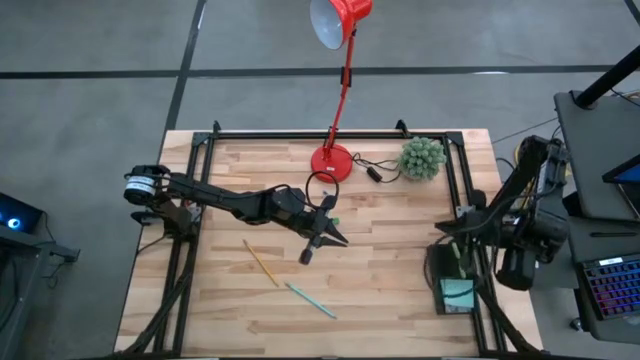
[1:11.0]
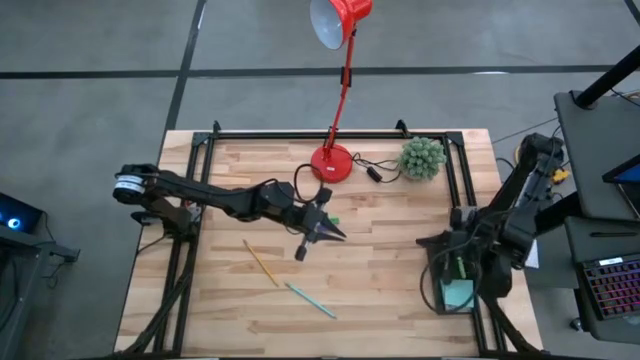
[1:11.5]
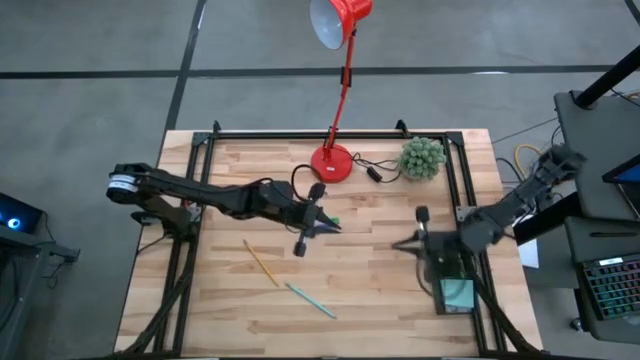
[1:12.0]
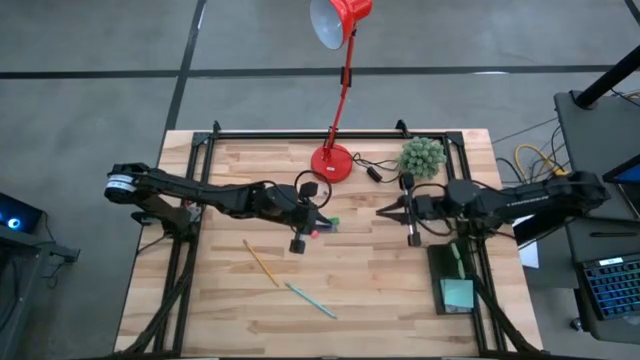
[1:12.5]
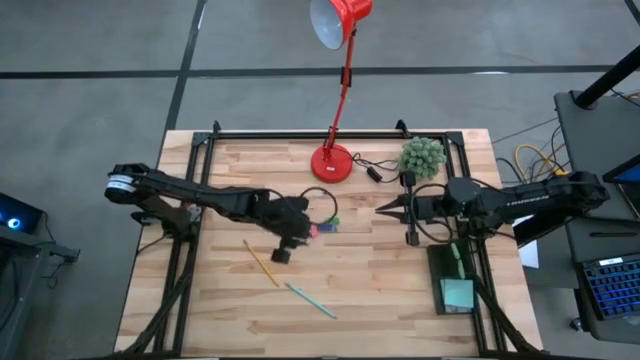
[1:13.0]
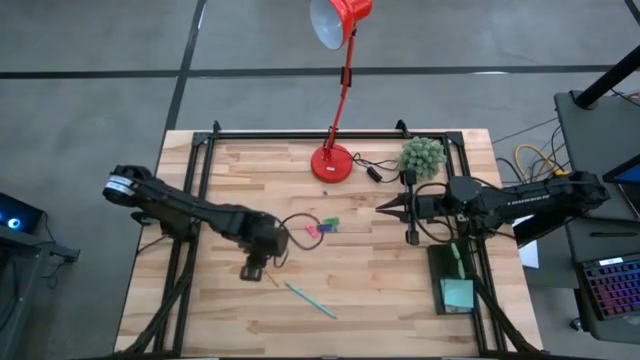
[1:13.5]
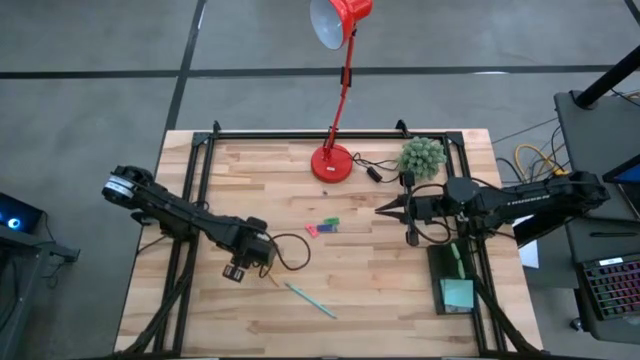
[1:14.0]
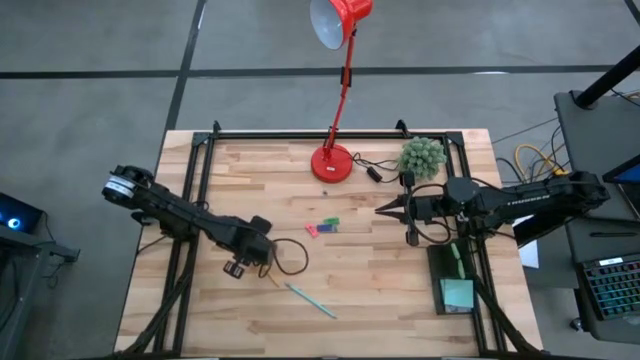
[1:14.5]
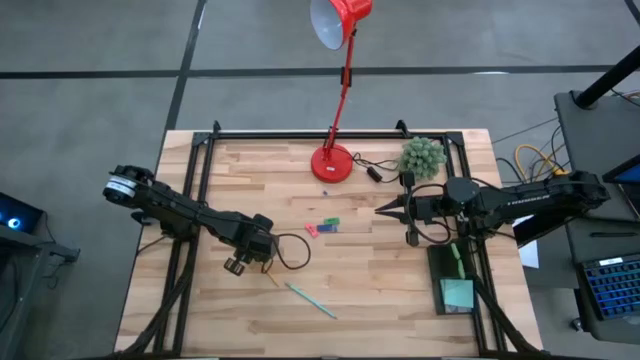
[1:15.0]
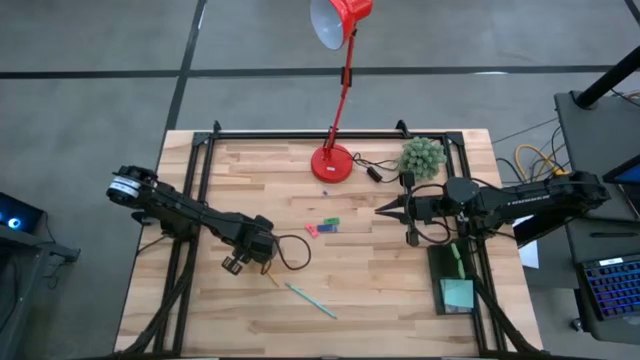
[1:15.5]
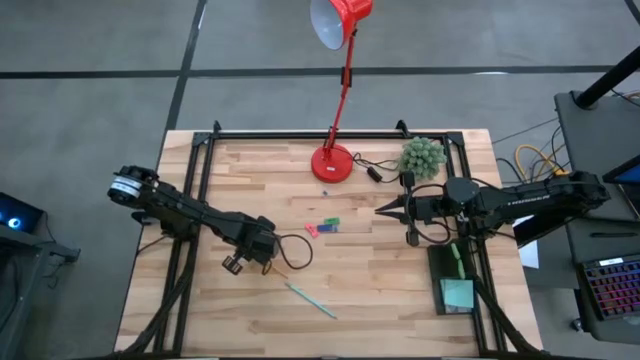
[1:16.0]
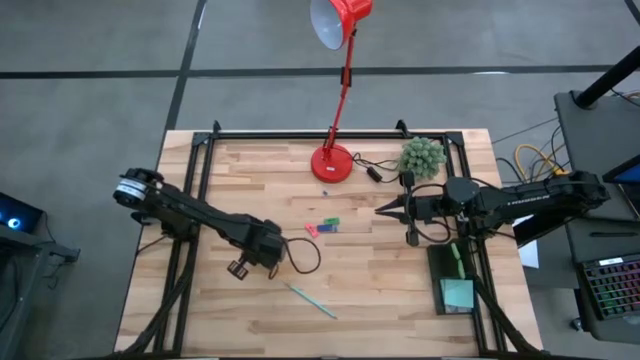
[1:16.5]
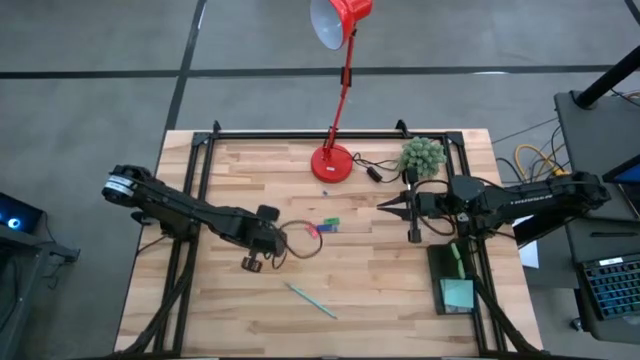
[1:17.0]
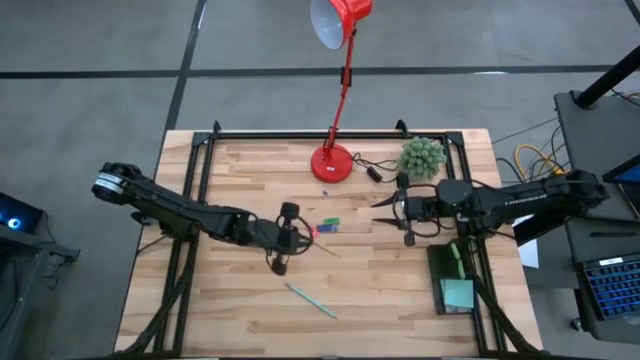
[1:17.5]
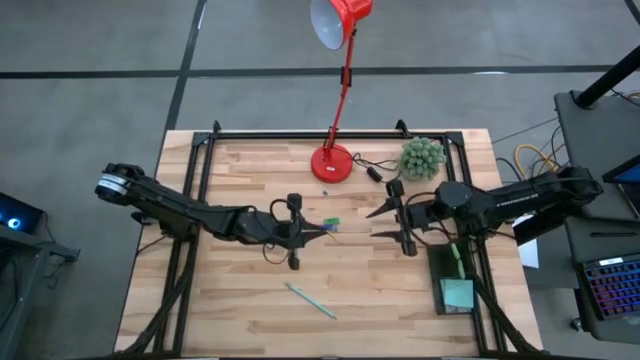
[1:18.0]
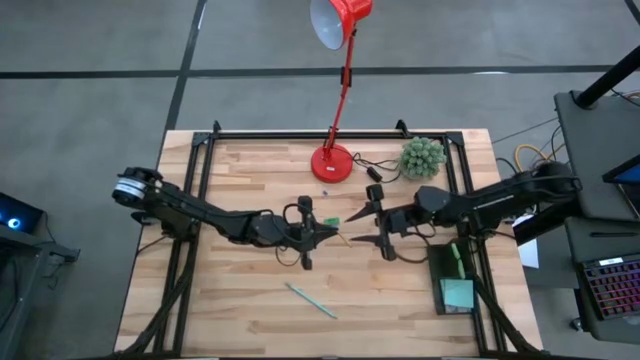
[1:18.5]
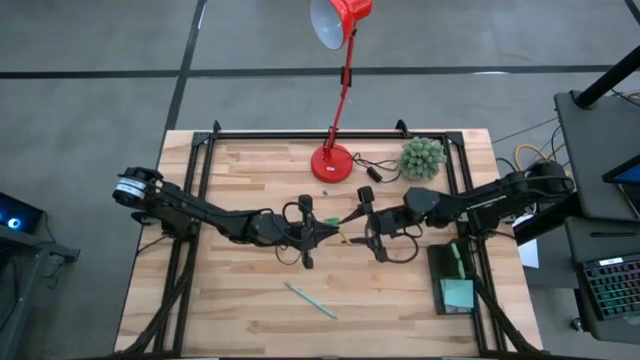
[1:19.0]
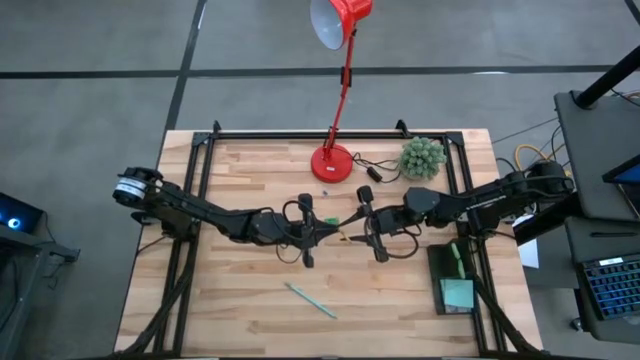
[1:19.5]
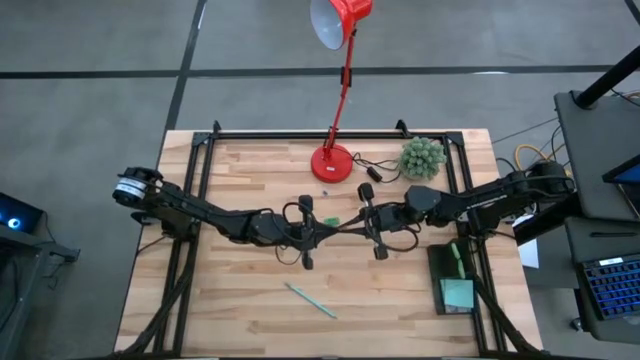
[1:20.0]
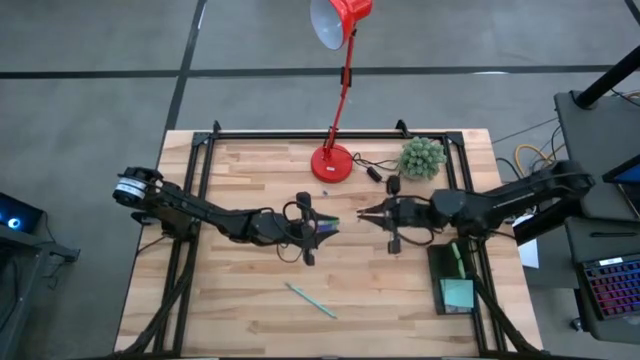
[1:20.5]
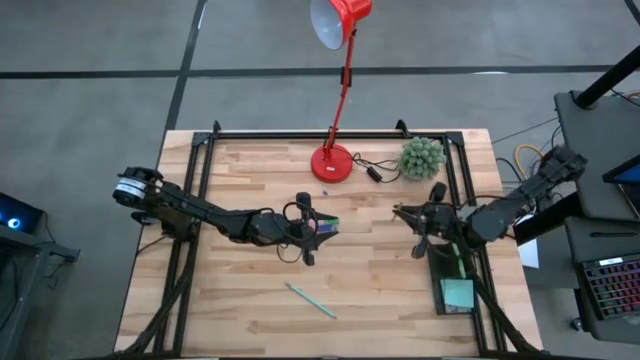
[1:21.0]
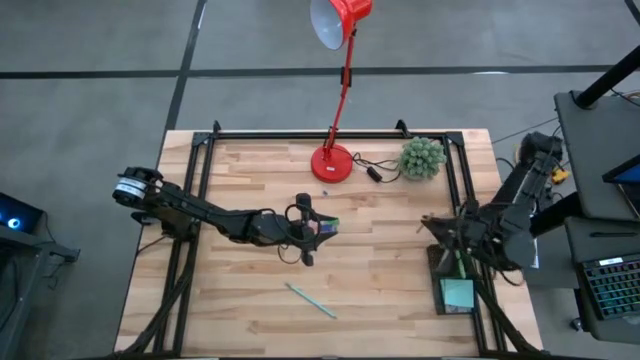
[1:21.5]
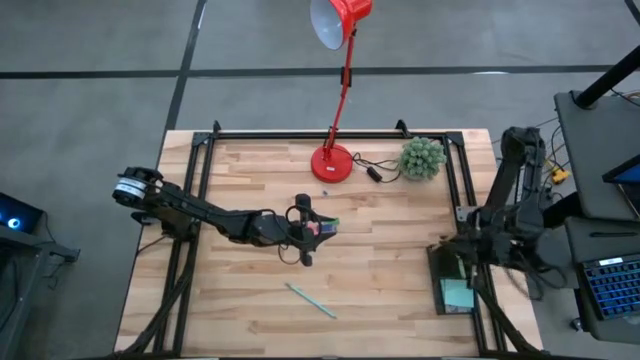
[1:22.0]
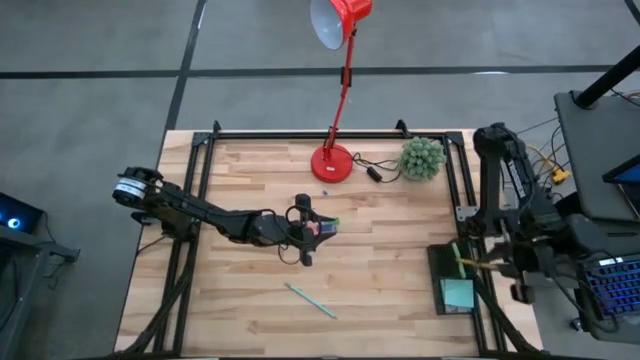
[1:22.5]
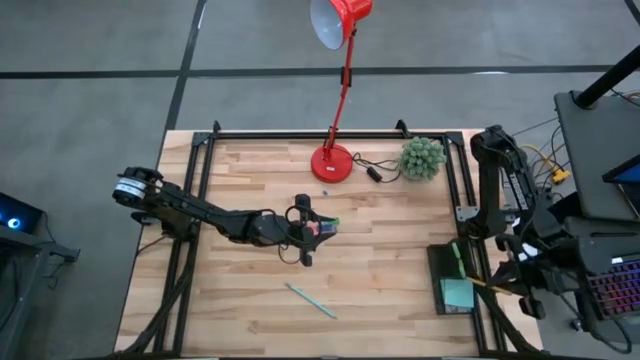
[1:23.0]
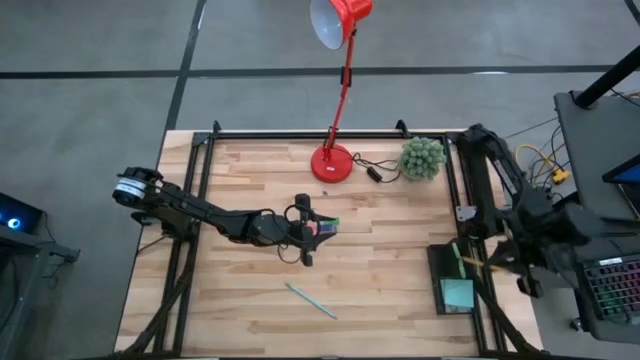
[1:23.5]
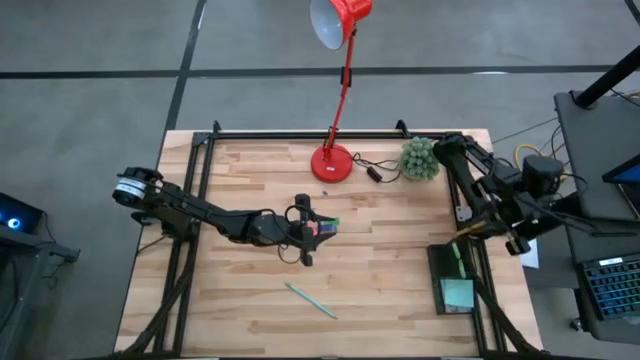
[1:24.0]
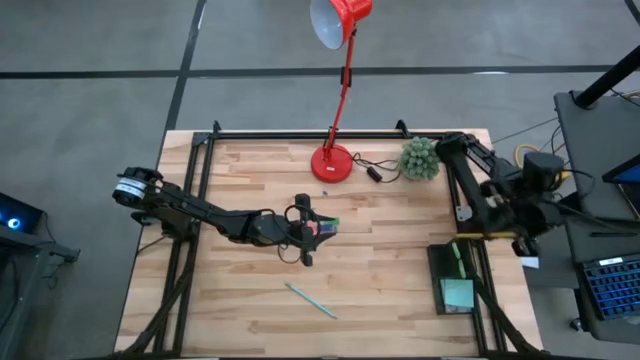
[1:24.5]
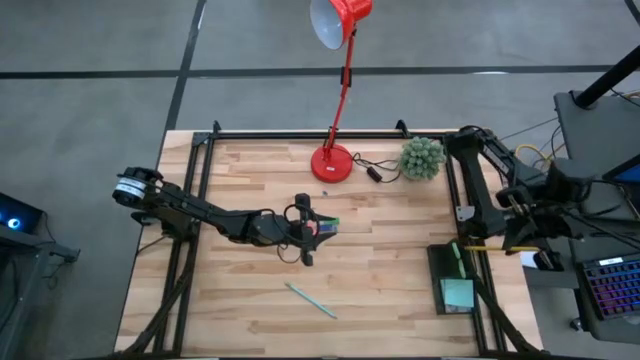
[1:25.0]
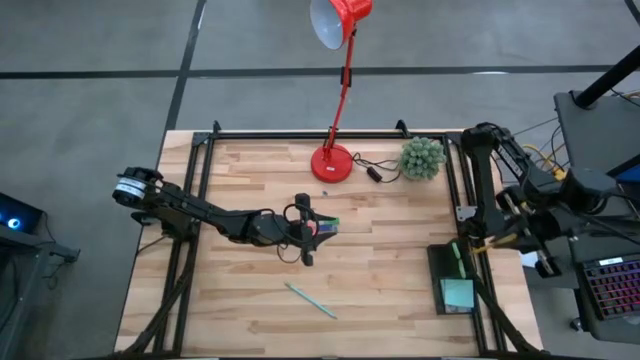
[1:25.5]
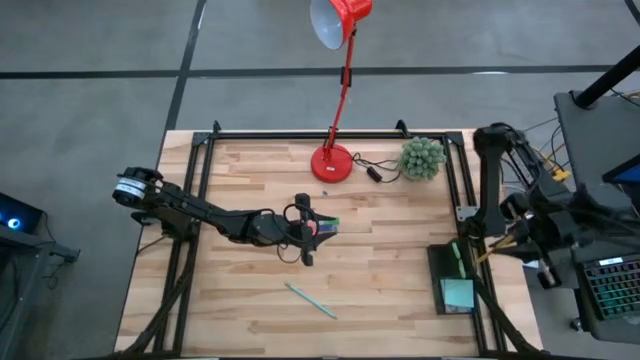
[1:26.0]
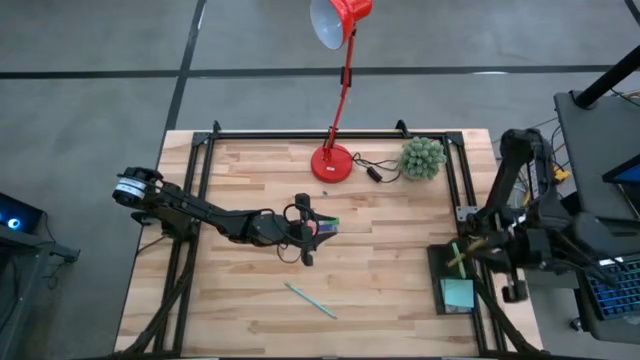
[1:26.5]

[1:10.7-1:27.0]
Task: Pick and place office supplies into organizer
Put the yellow pencil into the black desk organizer

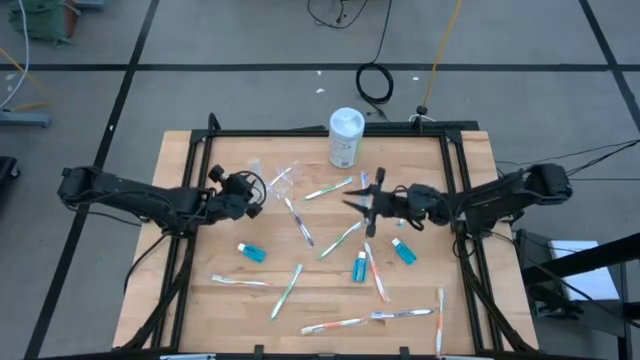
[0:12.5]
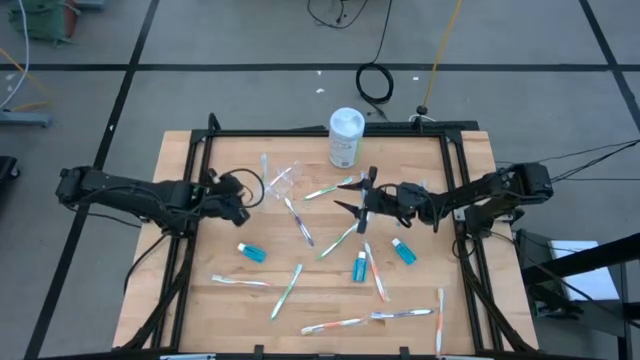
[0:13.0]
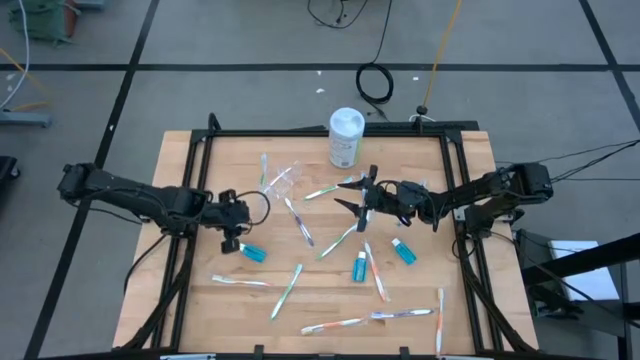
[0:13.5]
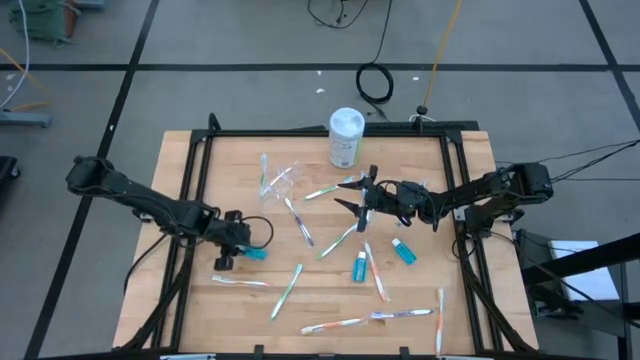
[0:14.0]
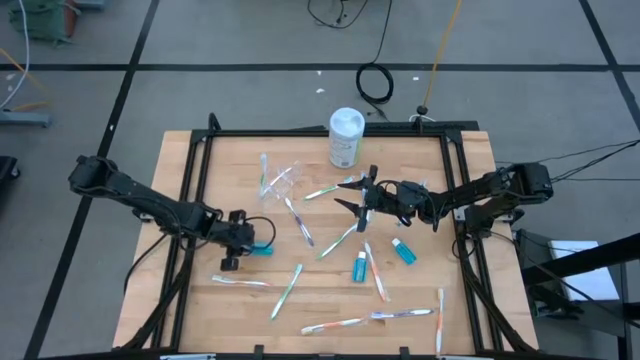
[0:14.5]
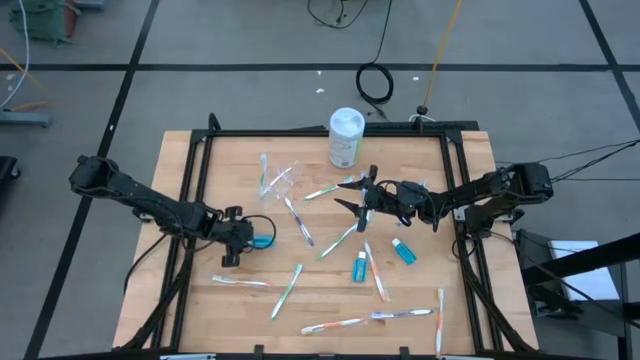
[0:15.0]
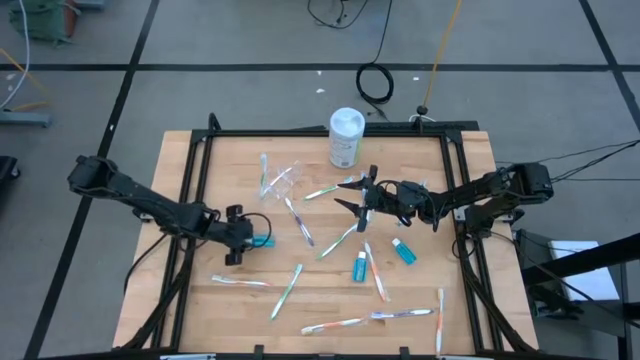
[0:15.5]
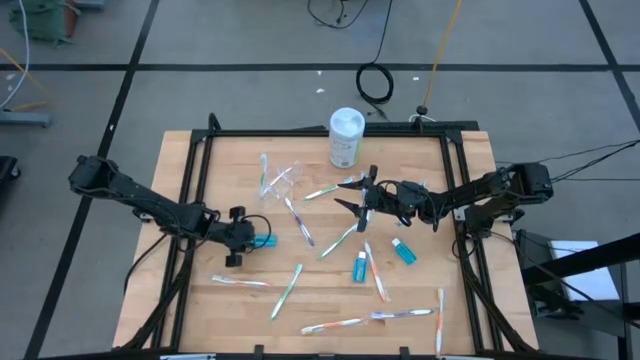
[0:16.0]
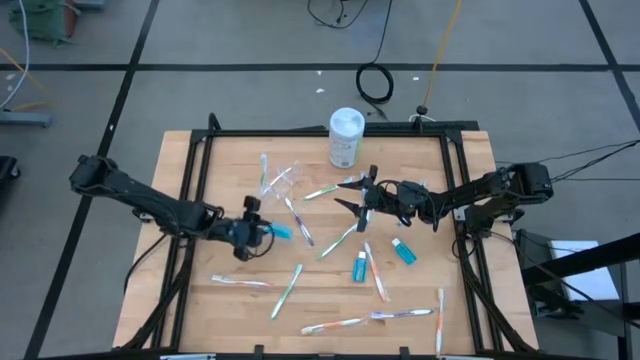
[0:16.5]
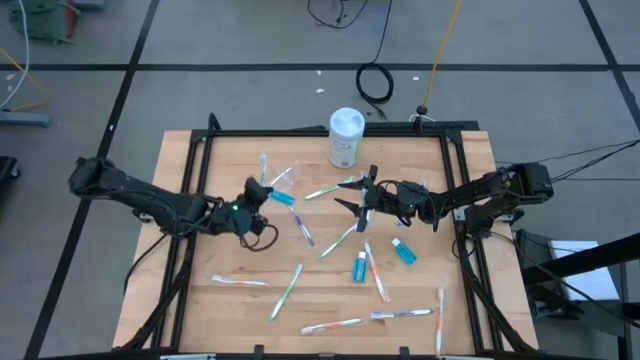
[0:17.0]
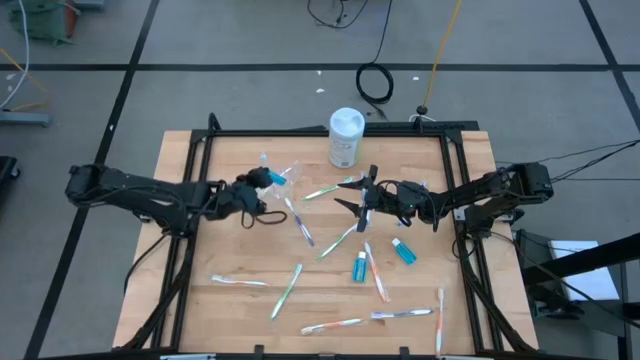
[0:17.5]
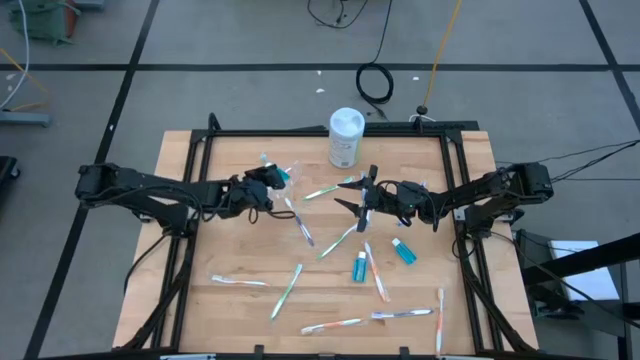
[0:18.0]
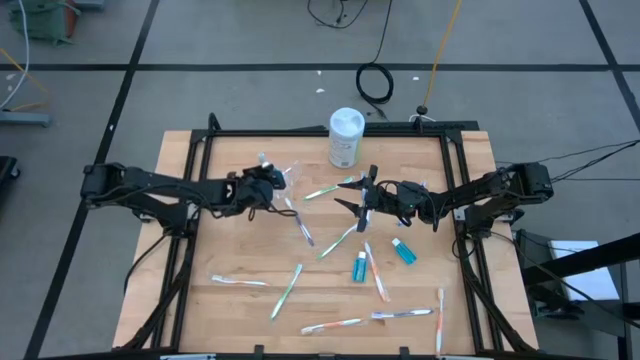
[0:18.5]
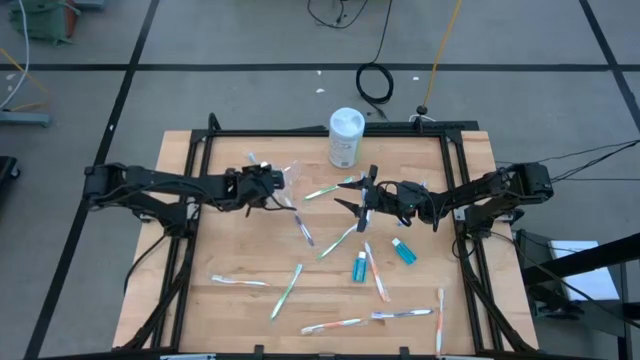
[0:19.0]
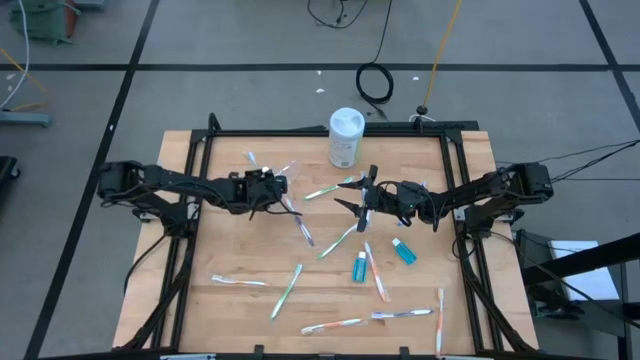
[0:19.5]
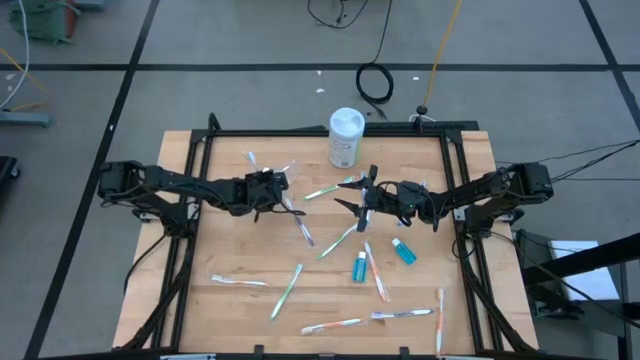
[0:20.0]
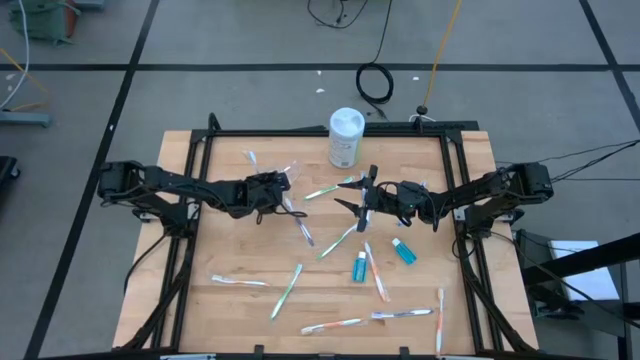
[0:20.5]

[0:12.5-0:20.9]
Task: Pick & Place toothbrushing station
Put the mouthwash into the middle of the transparent organizer
